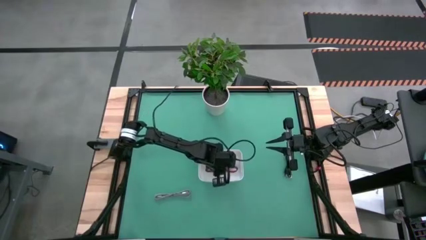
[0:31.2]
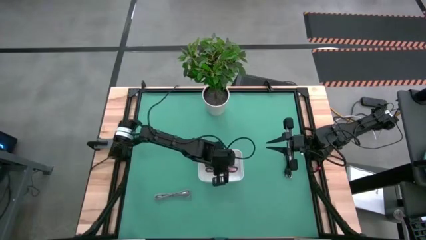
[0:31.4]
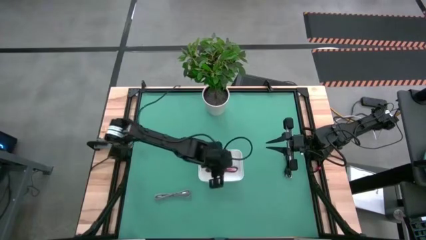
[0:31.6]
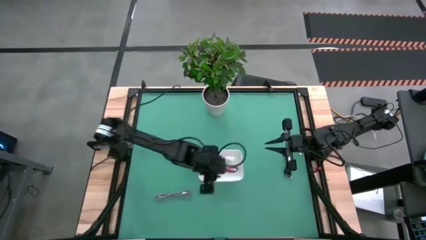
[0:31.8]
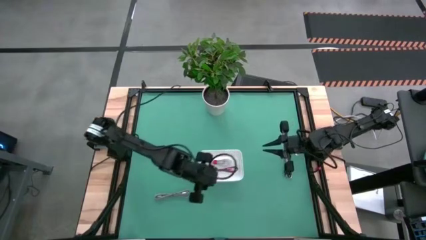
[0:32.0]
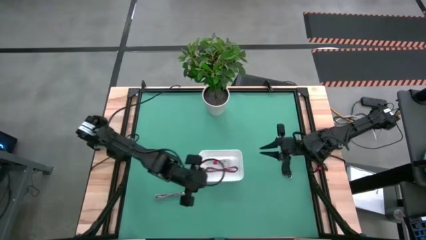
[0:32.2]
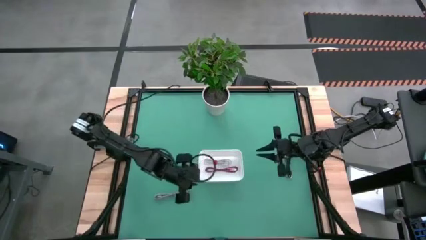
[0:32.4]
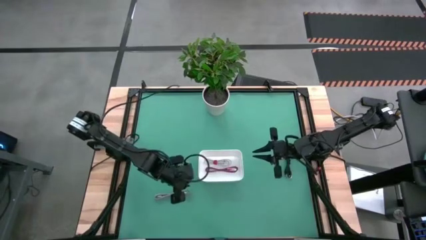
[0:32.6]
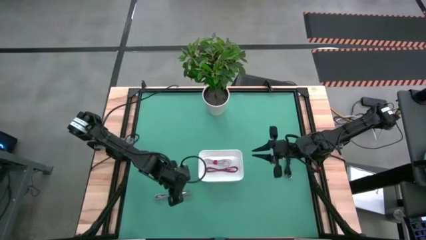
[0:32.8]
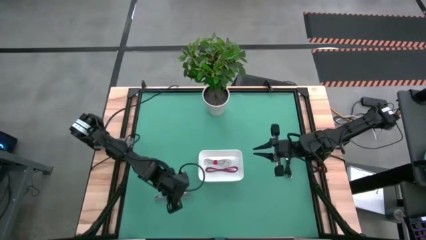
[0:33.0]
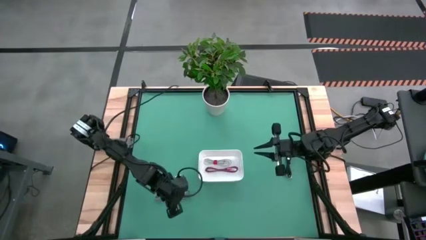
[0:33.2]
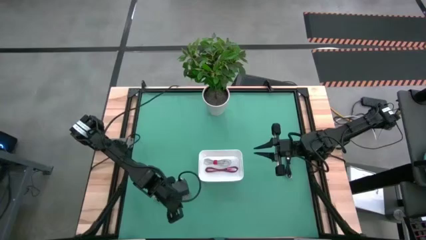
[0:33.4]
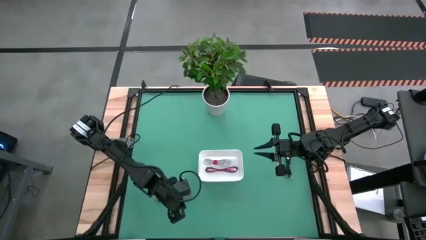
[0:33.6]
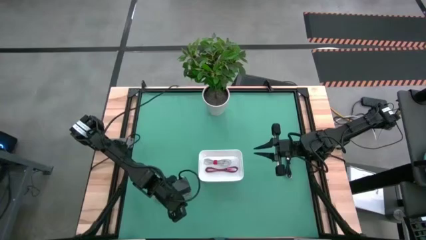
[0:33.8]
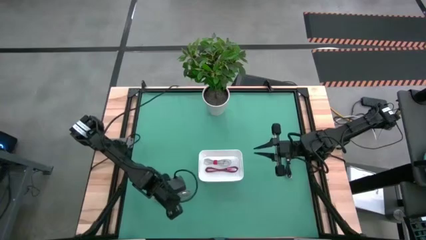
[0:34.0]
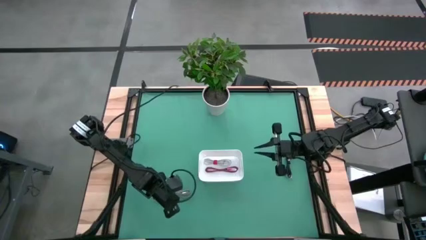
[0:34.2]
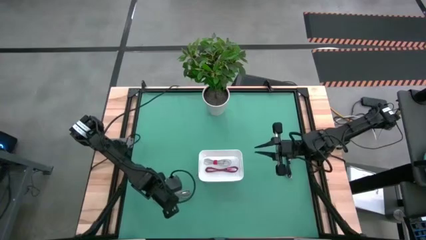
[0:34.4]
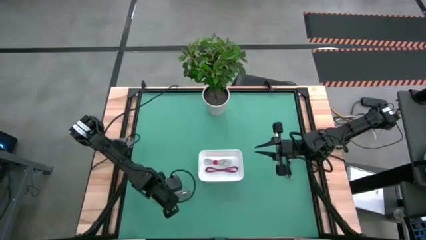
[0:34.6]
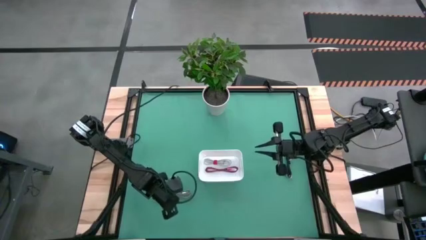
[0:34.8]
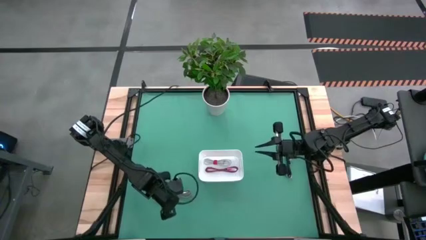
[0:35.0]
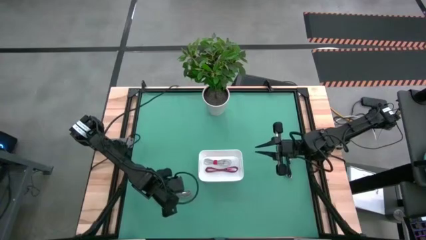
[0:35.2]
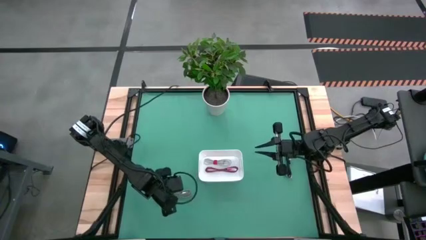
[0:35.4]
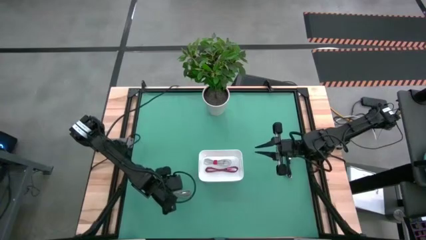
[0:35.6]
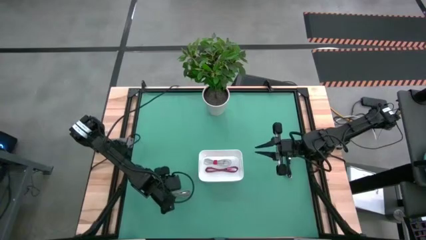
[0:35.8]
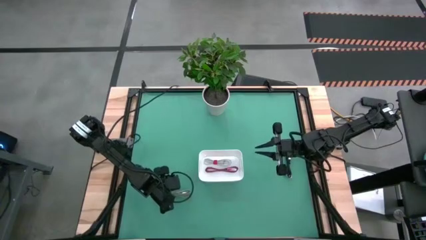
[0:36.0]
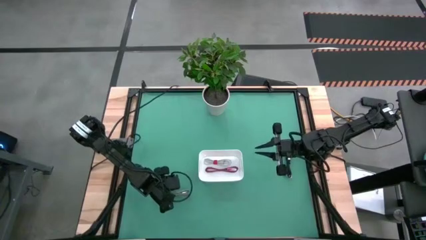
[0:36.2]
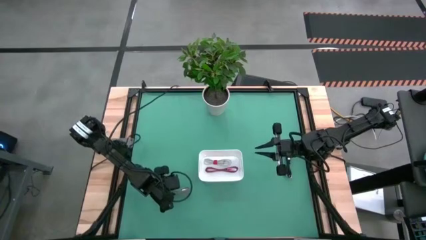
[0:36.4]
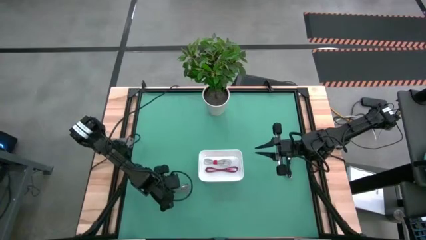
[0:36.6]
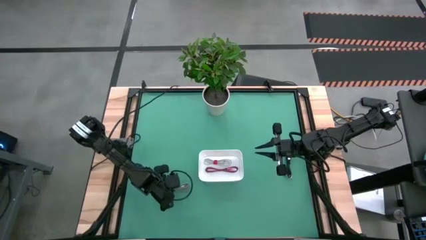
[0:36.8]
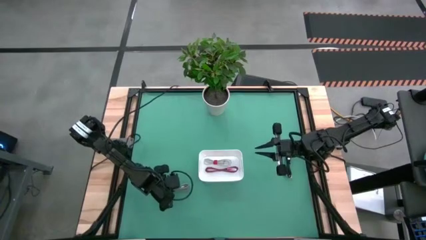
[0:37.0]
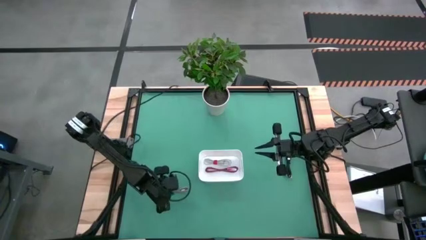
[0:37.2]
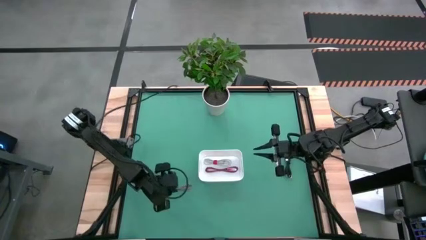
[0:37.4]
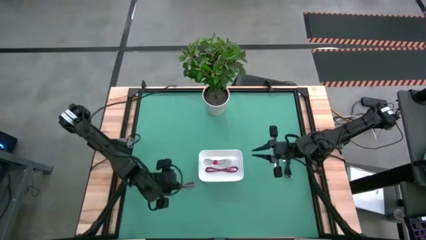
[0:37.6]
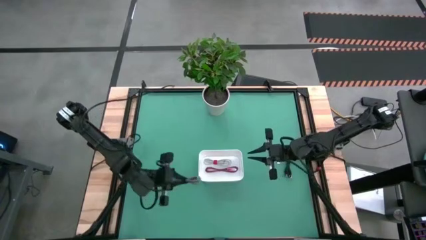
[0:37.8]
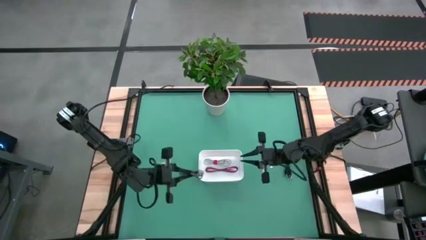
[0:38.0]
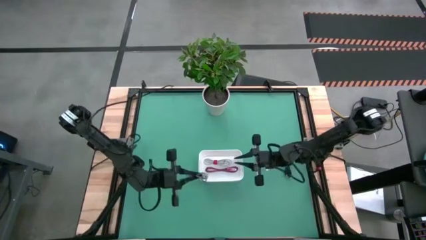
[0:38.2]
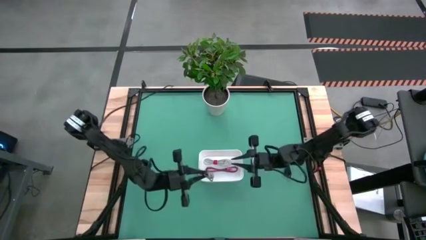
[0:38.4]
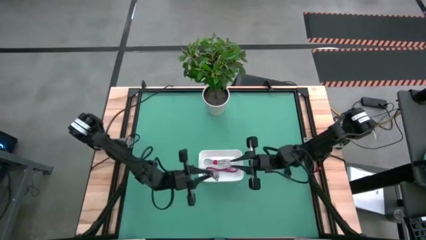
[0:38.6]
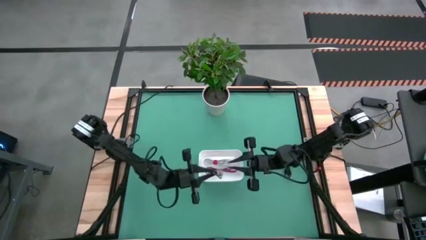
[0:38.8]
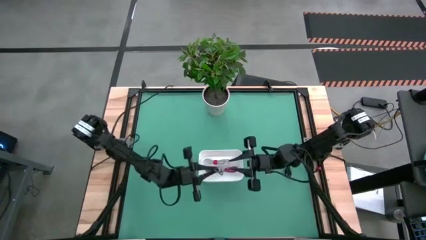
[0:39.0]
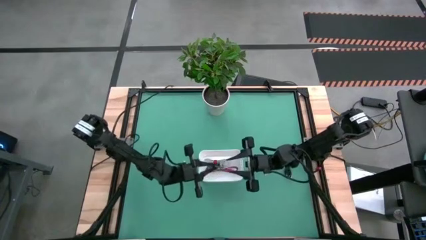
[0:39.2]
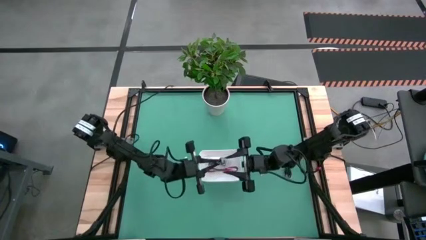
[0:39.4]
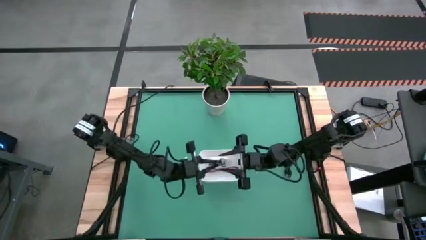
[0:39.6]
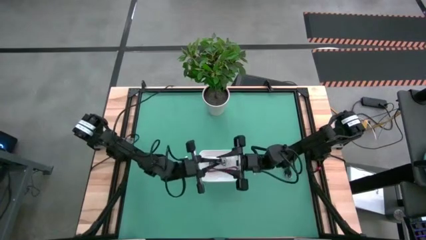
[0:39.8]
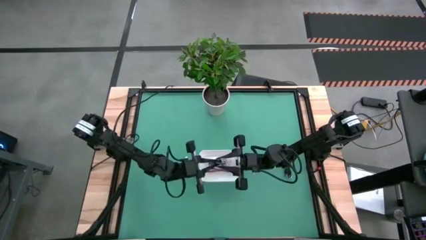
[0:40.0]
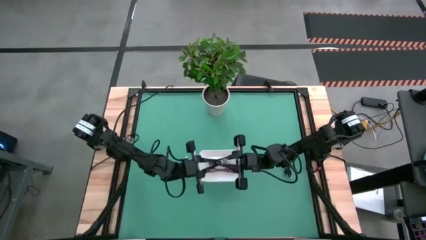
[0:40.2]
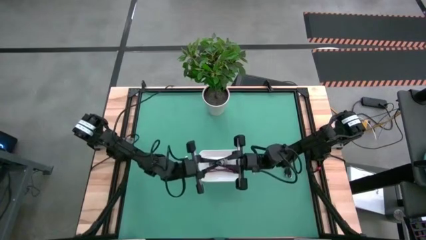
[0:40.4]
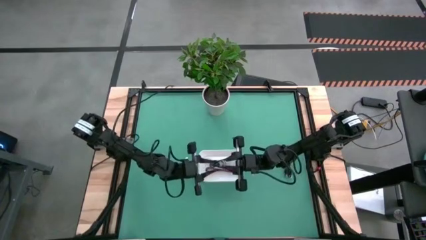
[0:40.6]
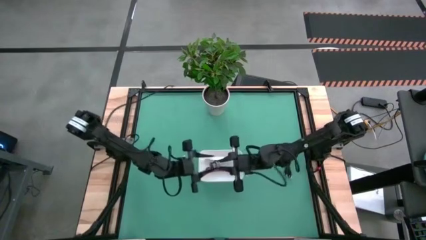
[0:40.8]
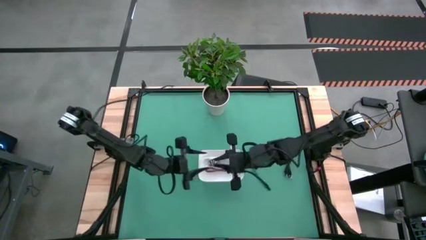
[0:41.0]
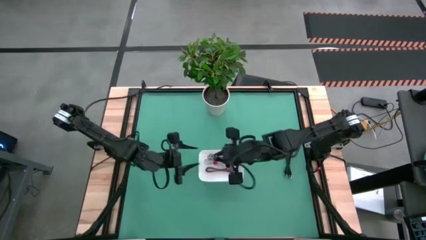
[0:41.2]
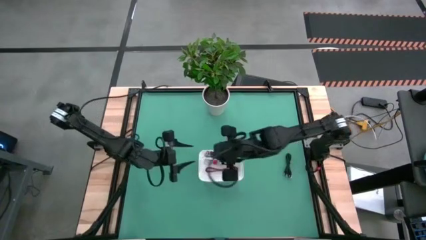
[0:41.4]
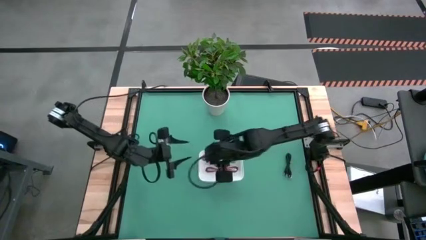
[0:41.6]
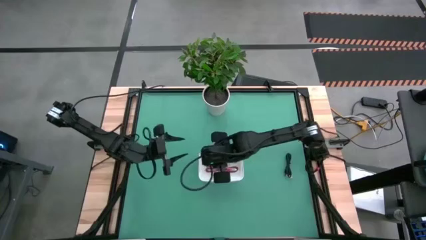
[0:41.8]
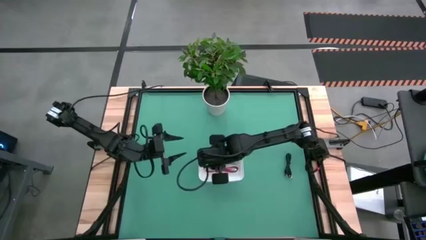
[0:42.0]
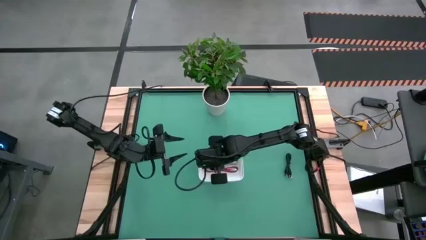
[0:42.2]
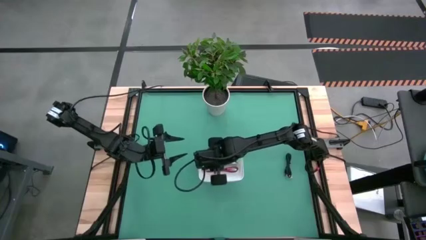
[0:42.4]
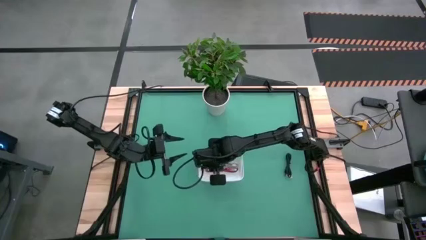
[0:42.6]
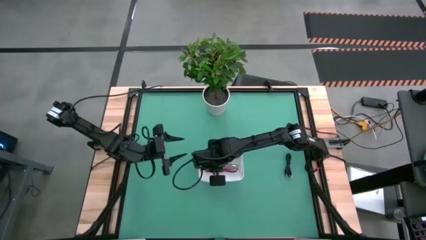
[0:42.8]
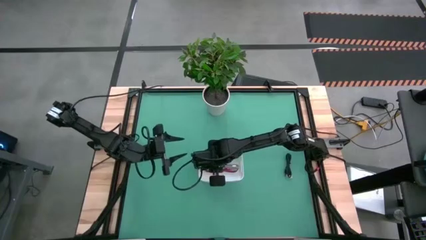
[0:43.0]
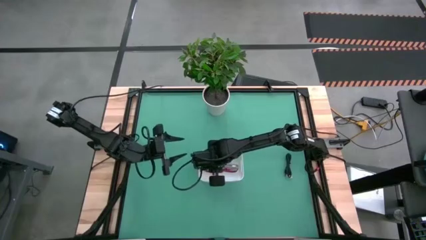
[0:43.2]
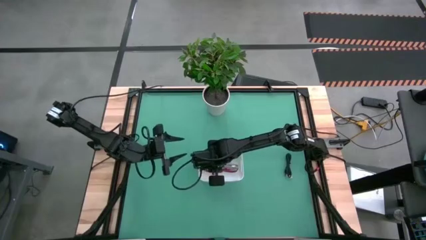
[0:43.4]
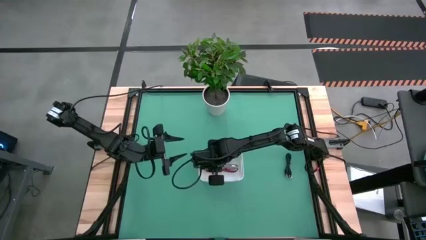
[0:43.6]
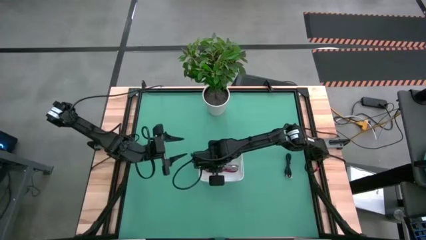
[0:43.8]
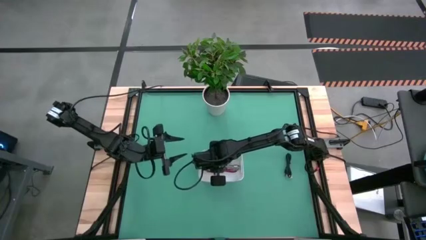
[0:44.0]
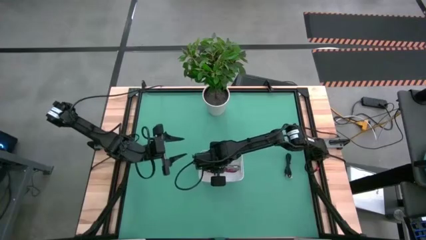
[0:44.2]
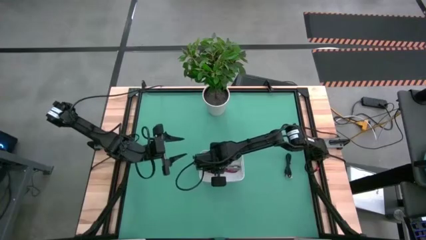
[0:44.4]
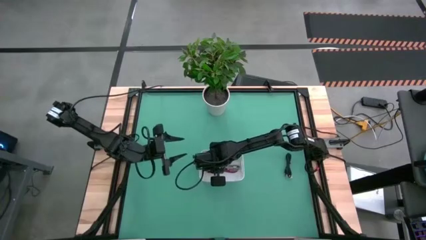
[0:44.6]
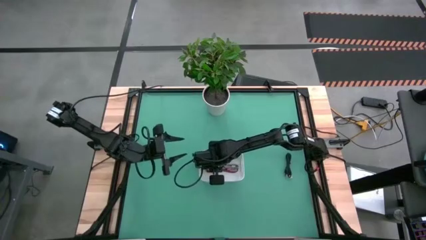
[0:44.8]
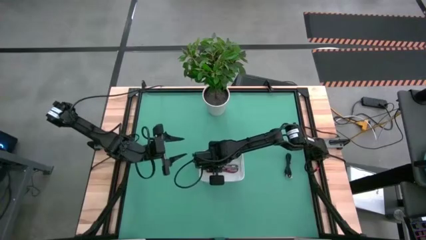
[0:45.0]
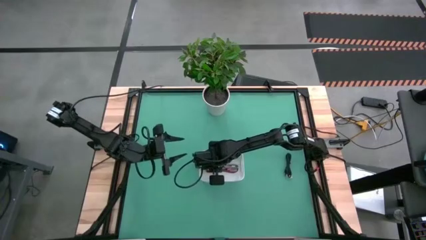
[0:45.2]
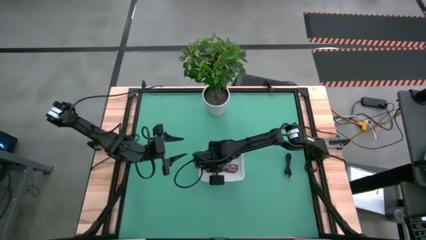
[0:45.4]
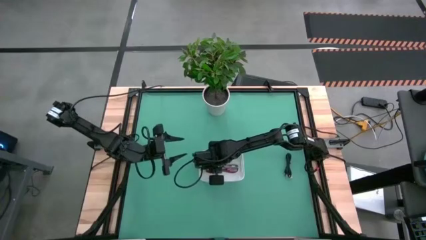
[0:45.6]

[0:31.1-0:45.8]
Task: Pick and place USB-C Cables
Put the white striped charger cable into the white bin

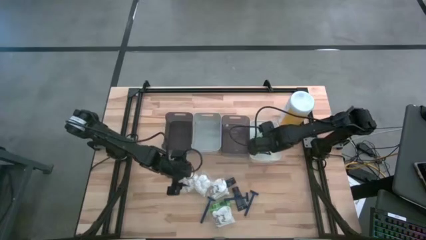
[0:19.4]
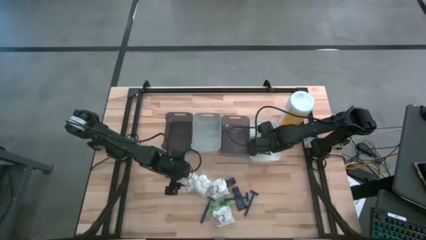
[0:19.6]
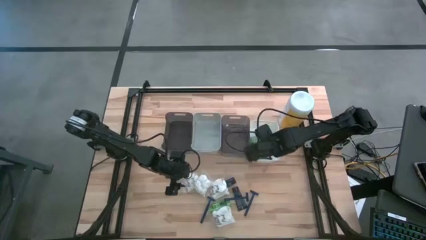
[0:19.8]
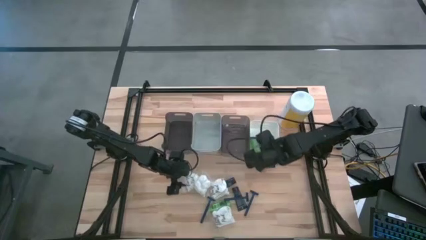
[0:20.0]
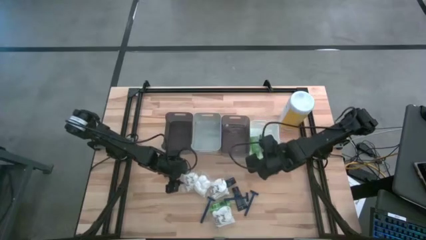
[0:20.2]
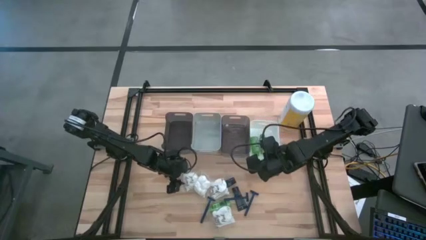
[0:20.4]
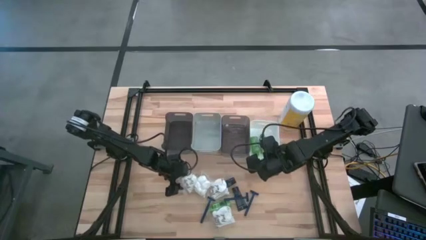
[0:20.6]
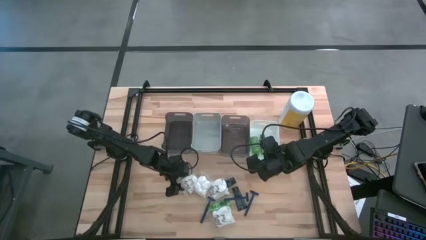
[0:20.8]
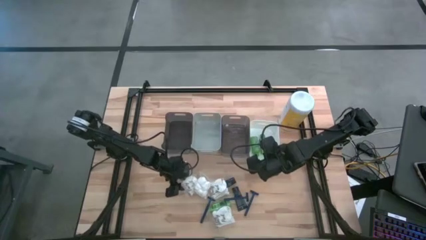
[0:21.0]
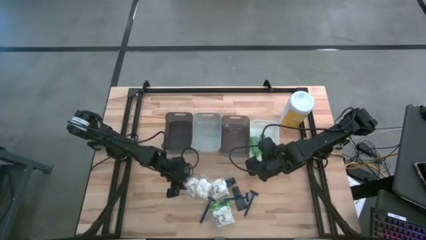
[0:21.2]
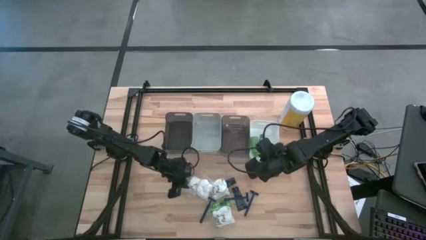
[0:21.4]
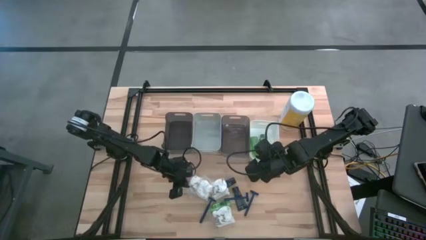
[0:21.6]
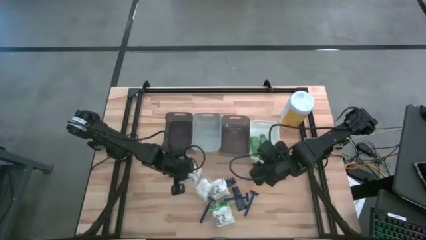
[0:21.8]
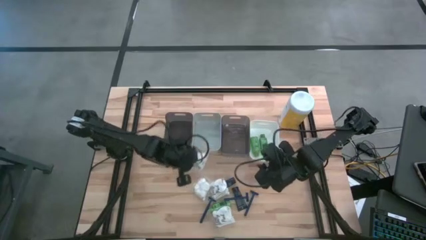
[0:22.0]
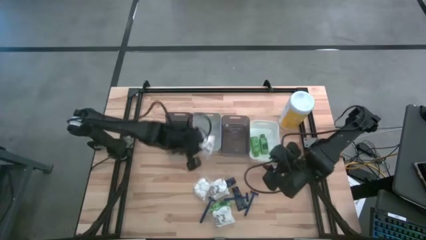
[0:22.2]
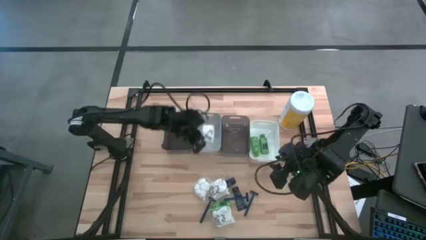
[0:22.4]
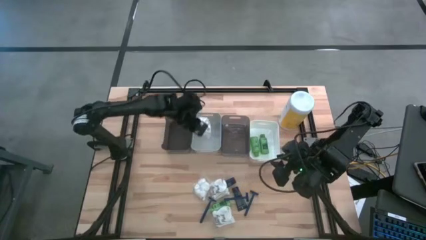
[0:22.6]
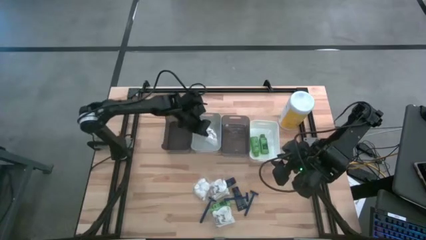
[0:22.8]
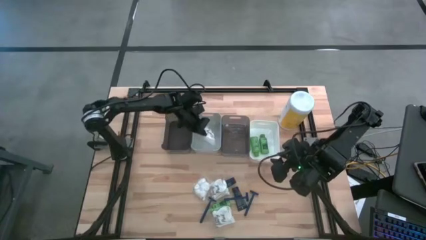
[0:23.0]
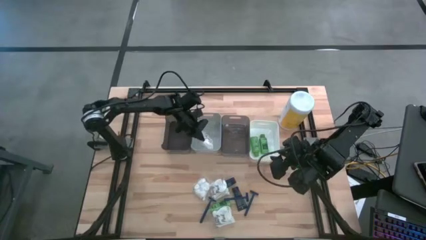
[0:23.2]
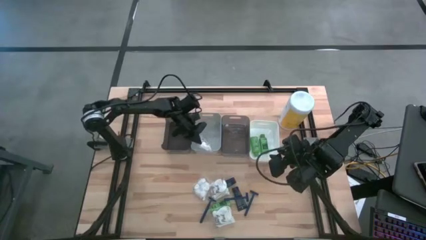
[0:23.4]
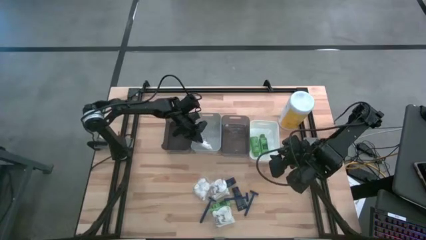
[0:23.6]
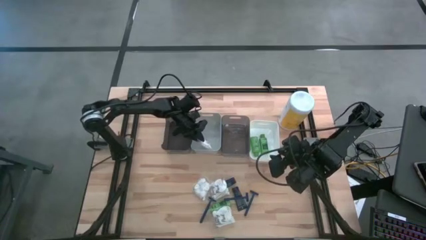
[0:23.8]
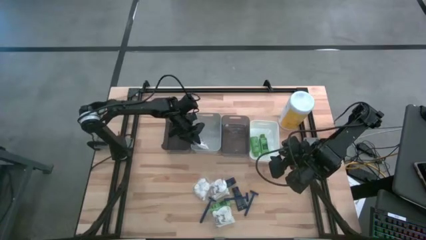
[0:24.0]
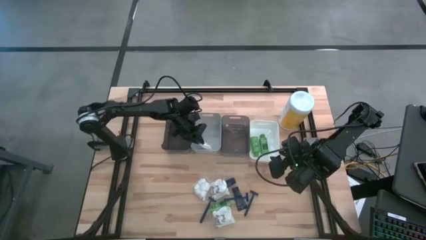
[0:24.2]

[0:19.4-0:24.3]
Task: Pick & Place Travel size toiletries
Put the white cotton pack into the gray bin
